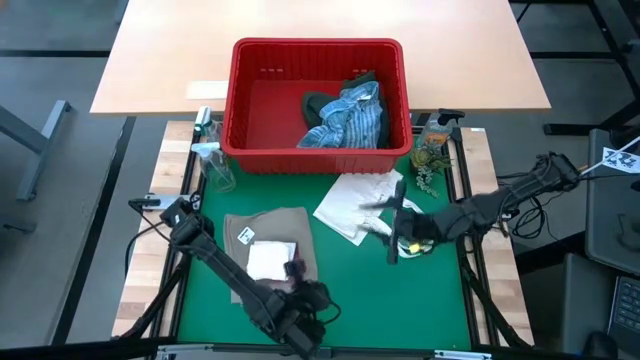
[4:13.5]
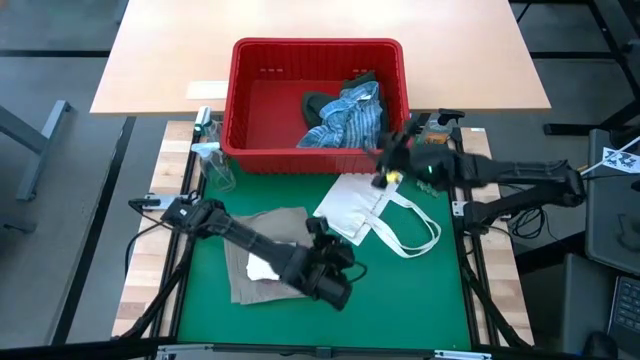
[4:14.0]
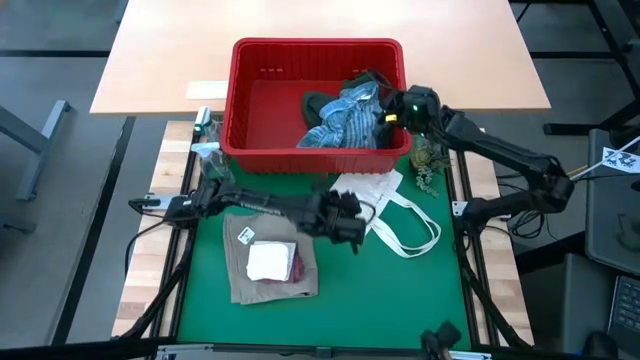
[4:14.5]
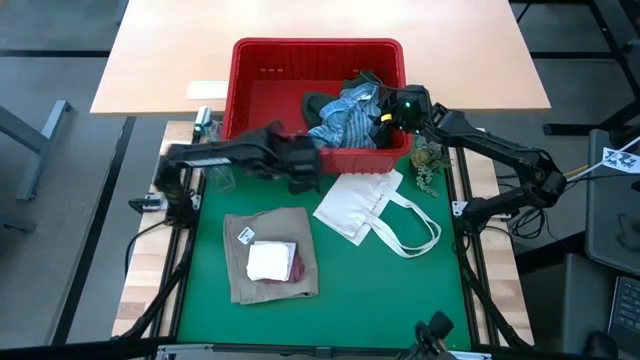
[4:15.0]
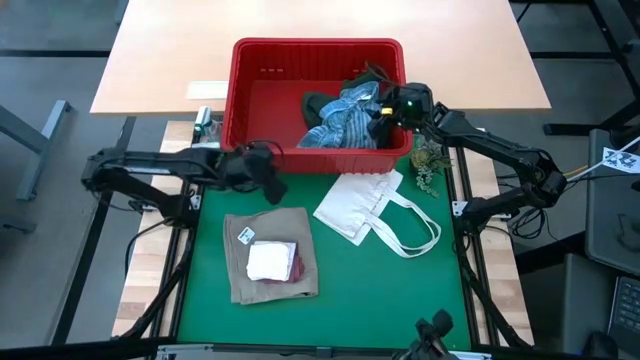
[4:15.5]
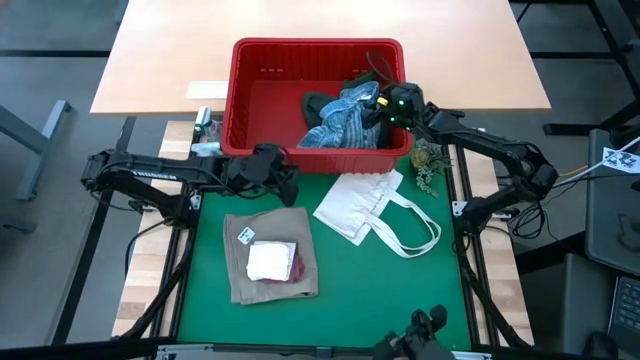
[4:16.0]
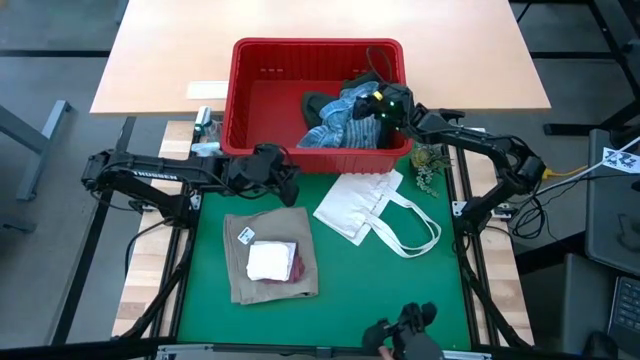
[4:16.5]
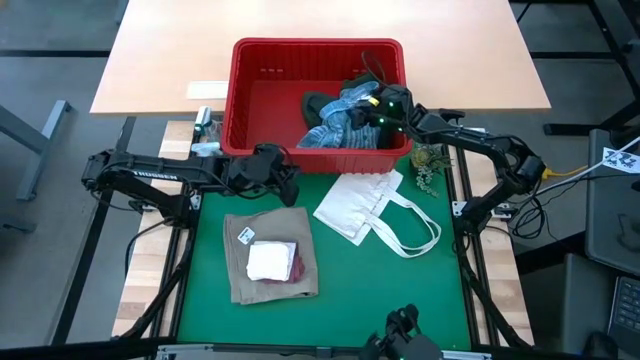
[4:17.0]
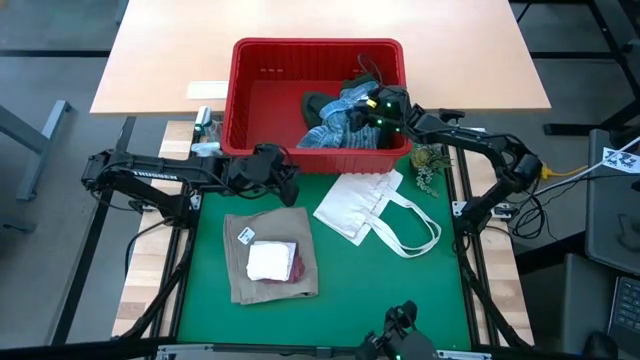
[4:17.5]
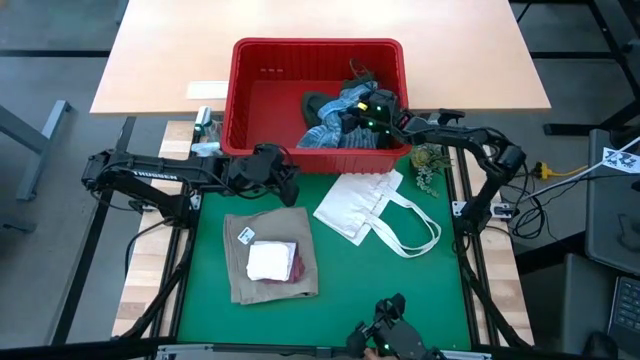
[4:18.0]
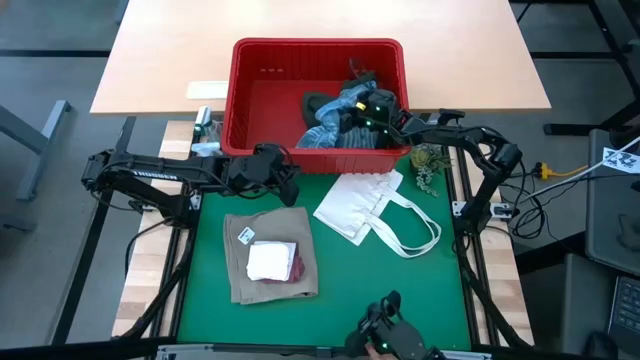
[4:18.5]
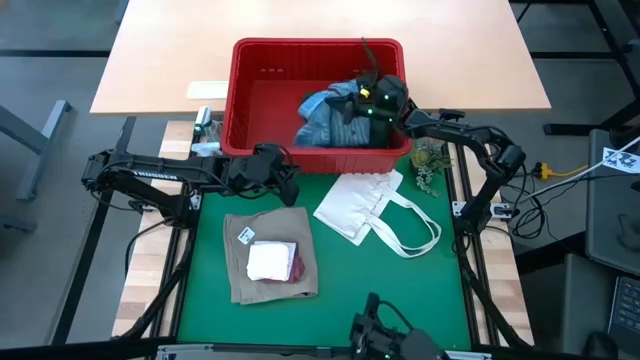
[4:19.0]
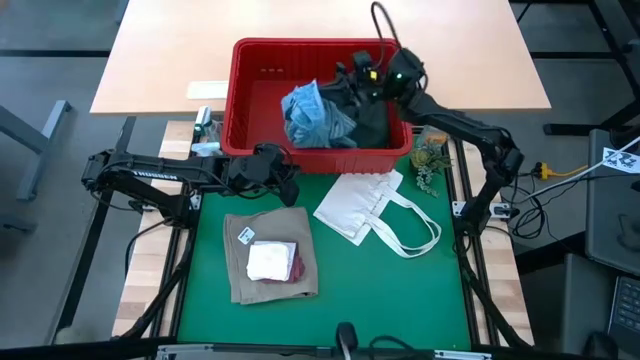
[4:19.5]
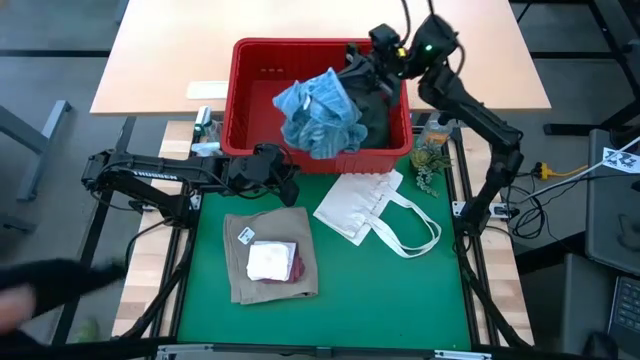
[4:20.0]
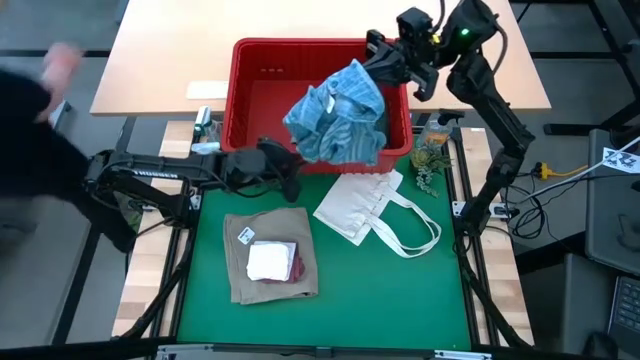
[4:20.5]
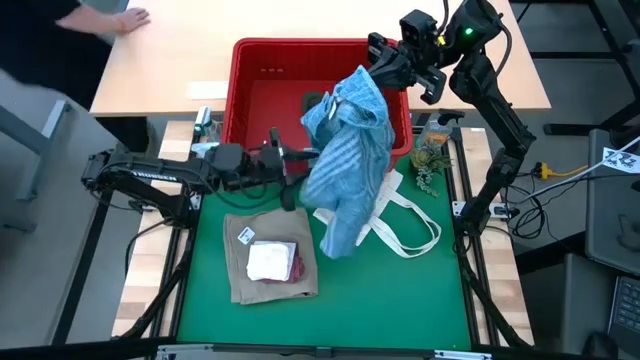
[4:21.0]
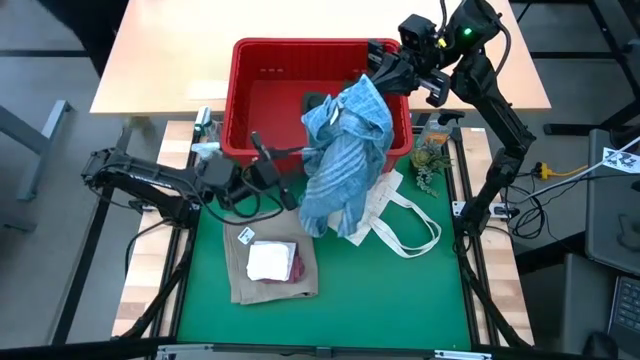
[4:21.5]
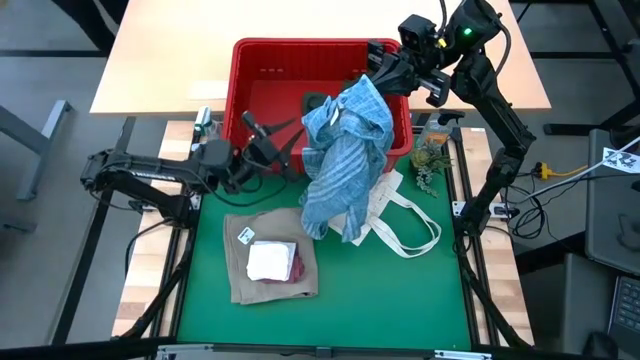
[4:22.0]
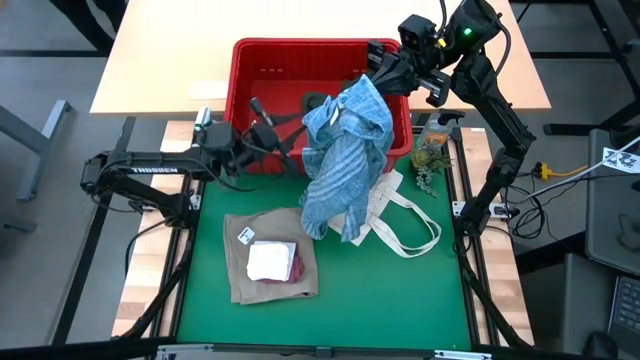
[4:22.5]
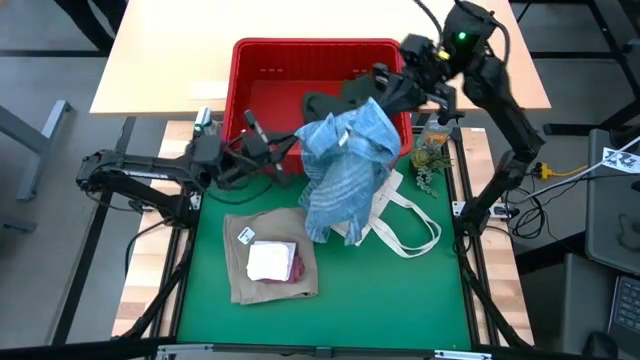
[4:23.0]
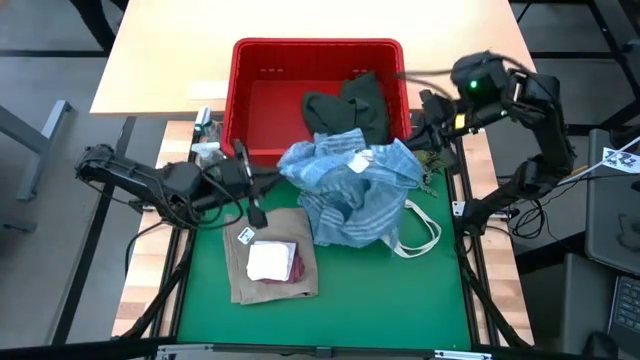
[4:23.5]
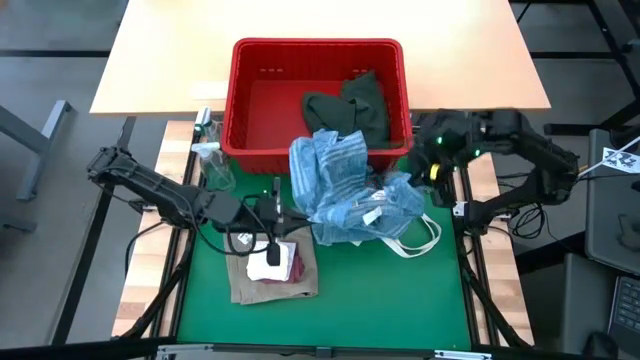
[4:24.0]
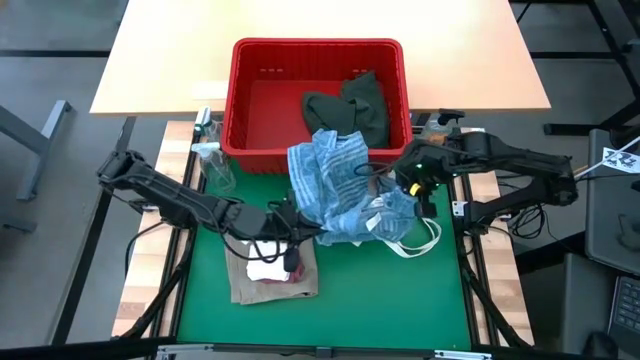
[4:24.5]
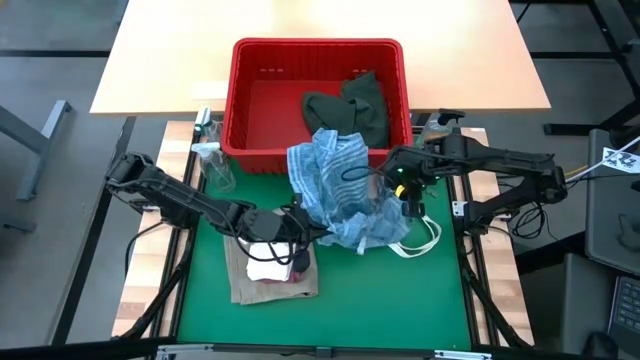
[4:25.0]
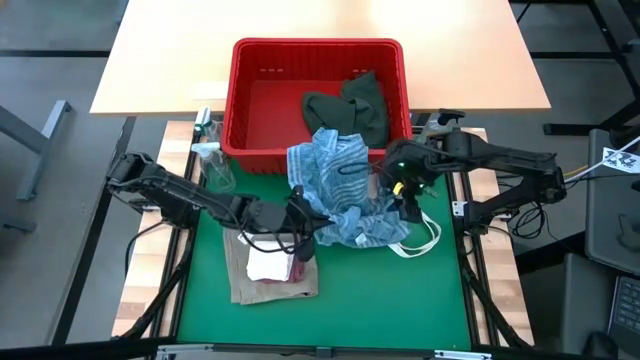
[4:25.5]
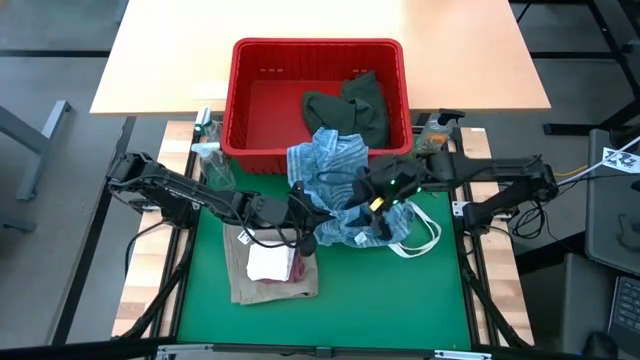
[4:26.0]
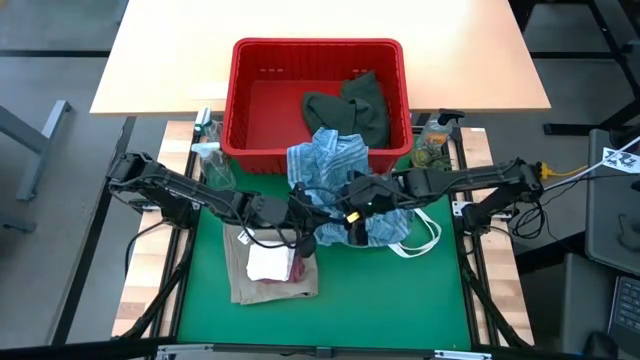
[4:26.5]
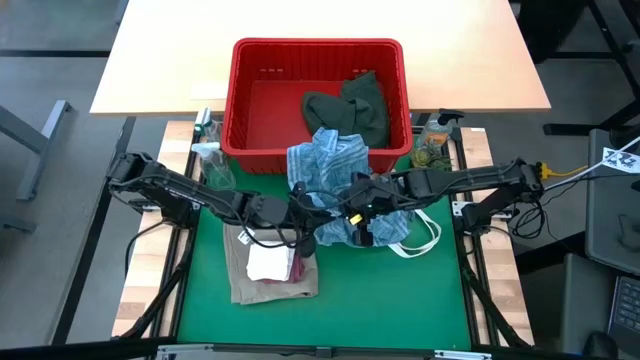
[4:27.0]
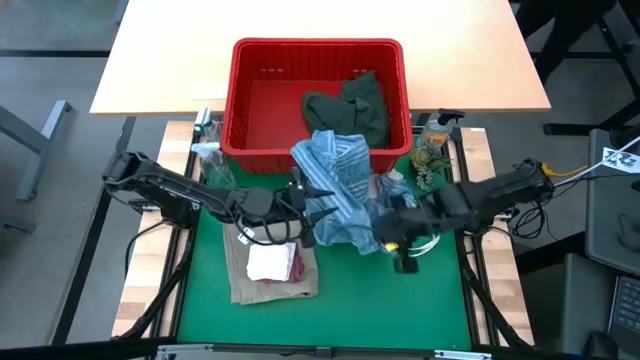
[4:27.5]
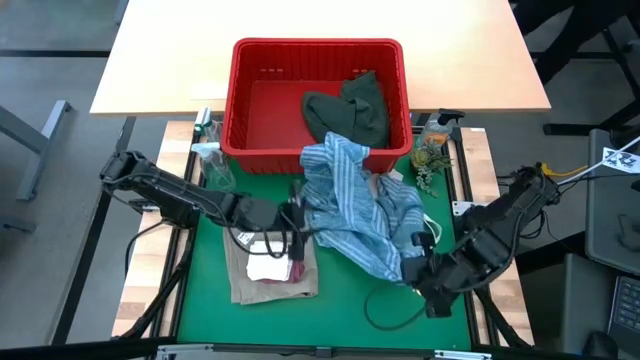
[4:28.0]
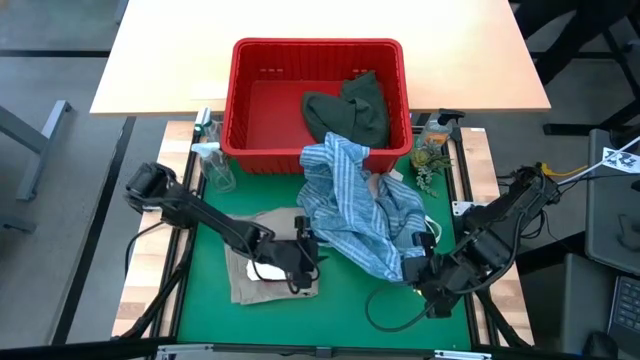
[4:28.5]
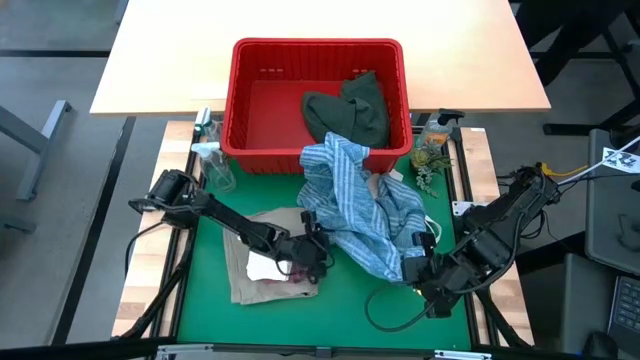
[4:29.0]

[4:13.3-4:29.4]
Task: Fold Laundry from Bin
Remove the blue polo shirt from the red bin
